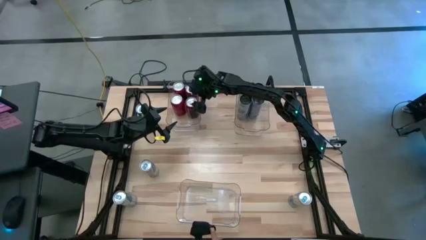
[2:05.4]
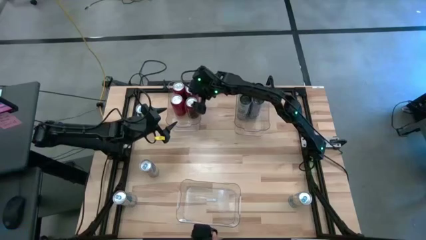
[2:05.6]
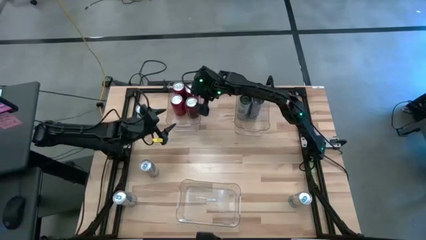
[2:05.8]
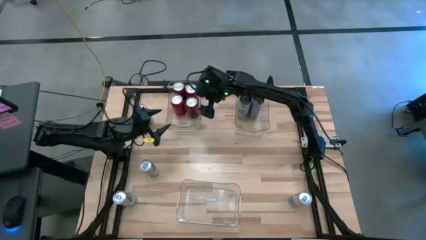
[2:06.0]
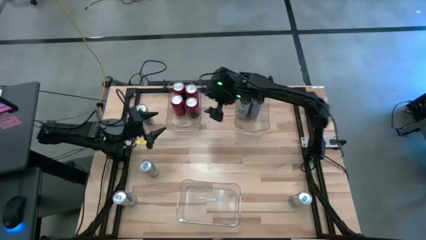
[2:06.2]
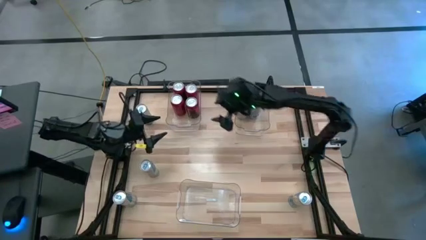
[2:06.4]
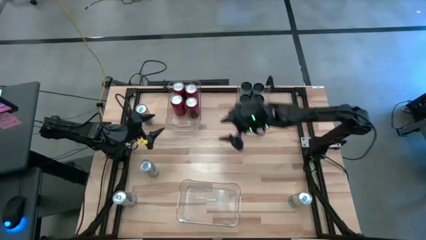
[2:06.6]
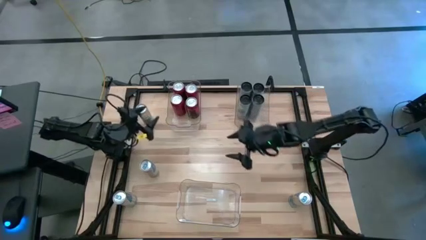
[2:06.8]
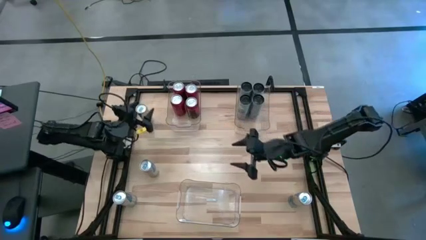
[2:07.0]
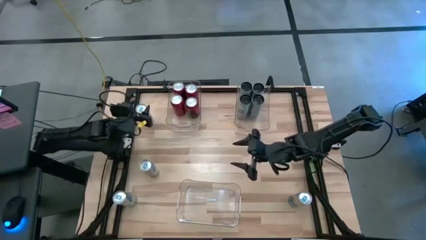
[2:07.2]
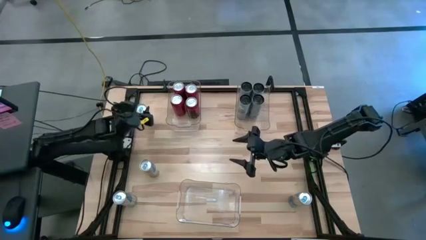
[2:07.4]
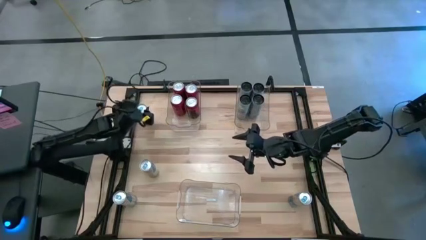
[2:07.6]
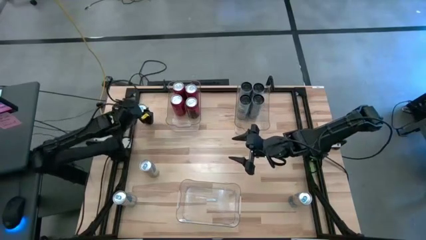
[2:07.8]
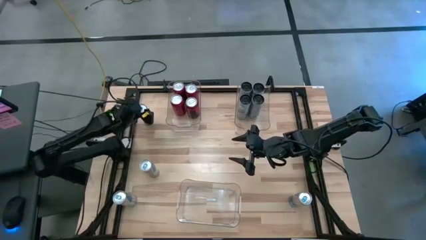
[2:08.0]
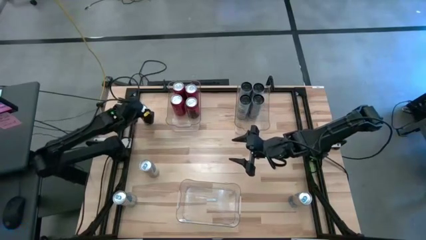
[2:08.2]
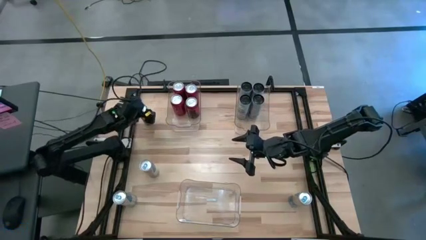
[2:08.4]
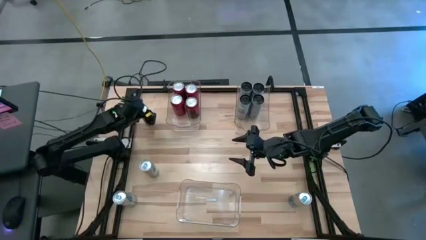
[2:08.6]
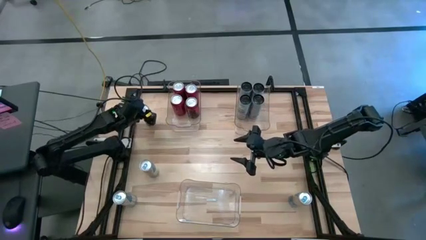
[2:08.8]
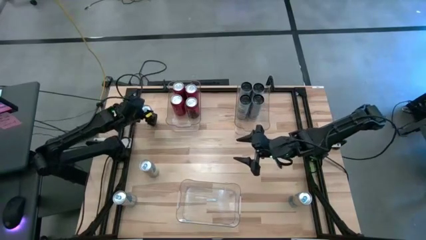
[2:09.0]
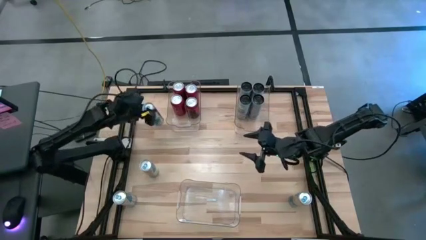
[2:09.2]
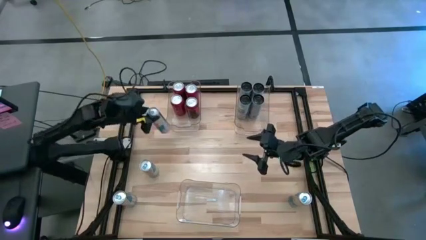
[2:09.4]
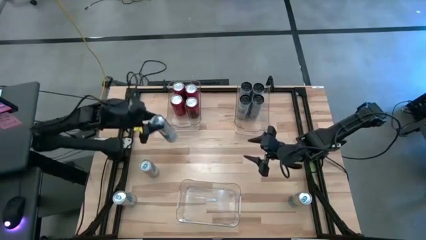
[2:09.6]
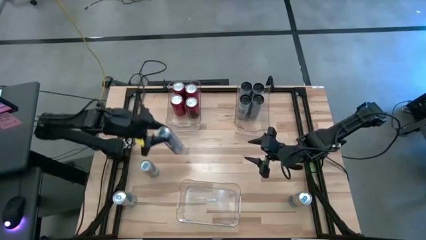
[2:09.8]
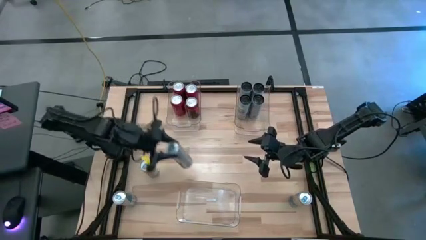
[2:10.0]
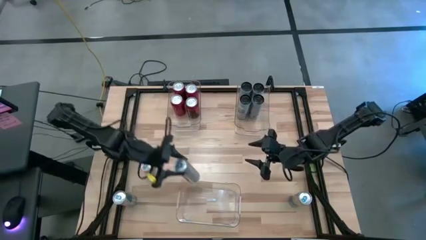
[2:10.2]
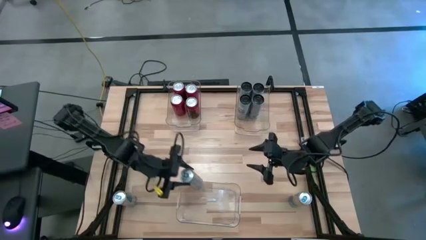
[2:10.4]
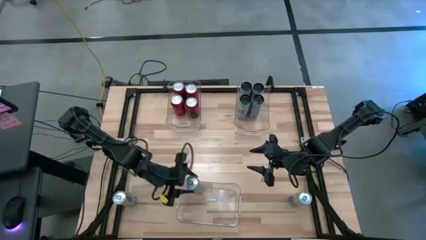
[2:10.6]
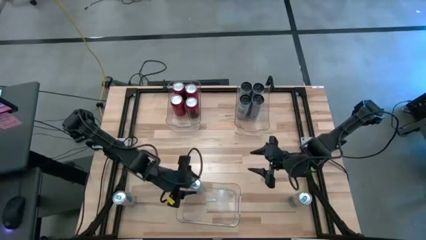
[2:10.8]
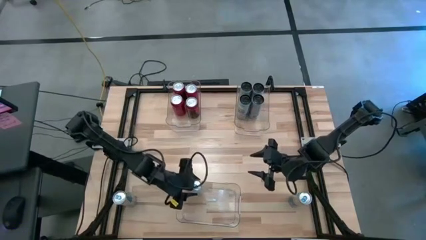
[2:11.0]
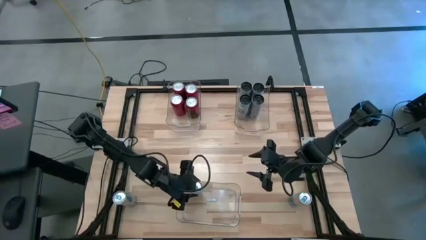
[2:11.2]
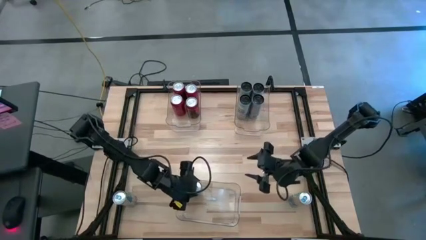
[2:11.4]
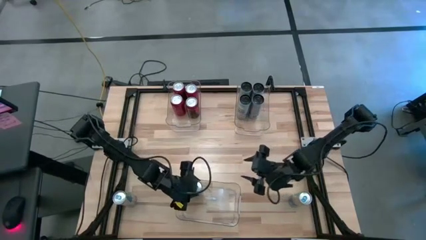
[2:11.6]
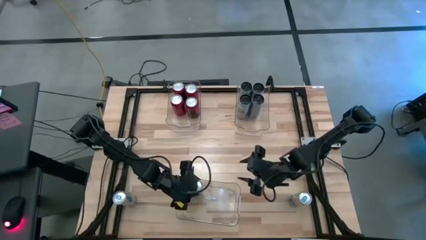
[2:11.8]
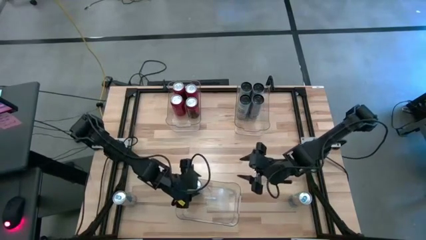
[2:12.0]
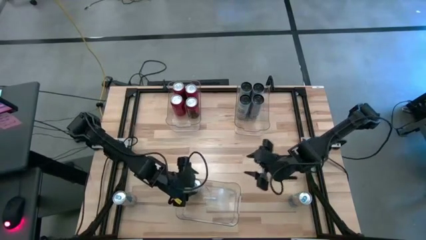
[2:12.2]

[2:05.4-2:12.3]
Task: Sort soda cans
Put the top left blue soda can into the bottom transparent bin

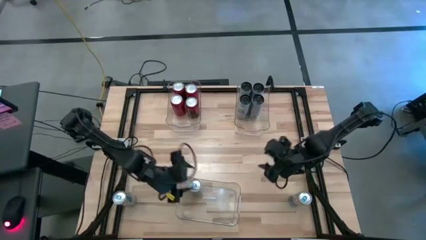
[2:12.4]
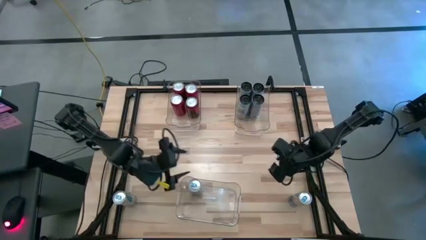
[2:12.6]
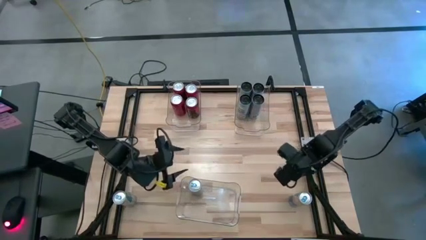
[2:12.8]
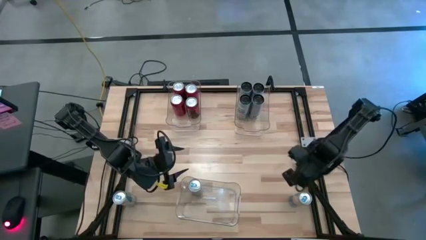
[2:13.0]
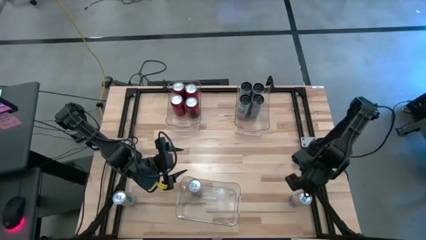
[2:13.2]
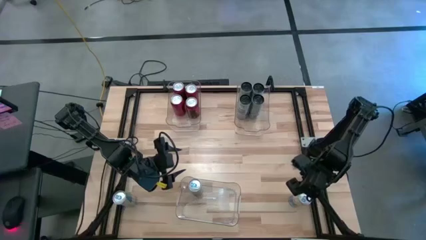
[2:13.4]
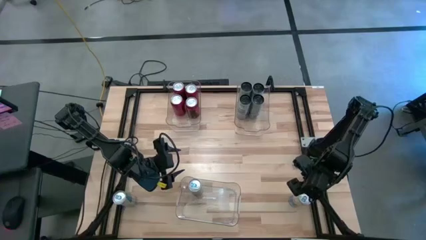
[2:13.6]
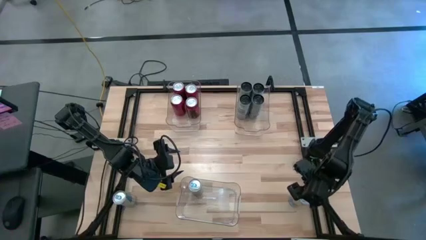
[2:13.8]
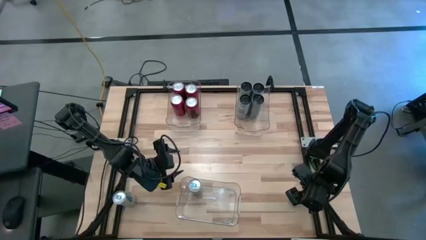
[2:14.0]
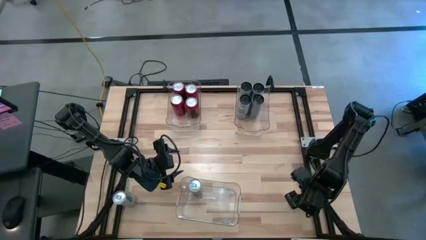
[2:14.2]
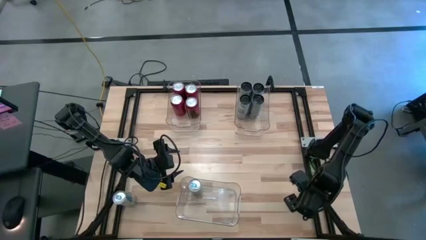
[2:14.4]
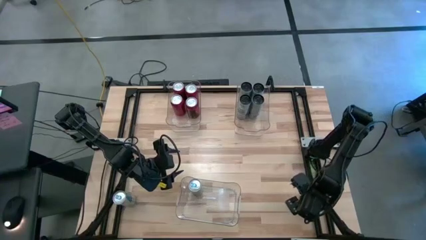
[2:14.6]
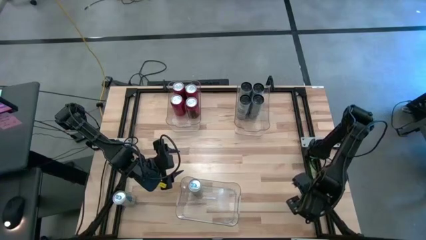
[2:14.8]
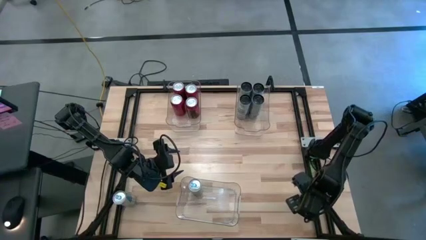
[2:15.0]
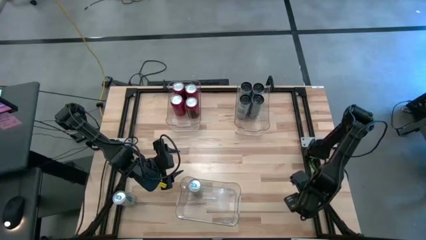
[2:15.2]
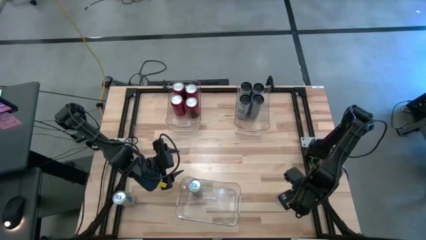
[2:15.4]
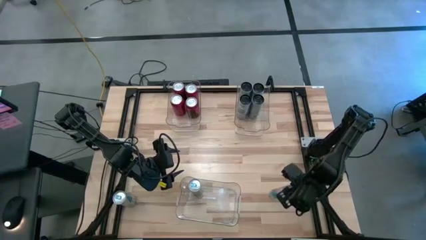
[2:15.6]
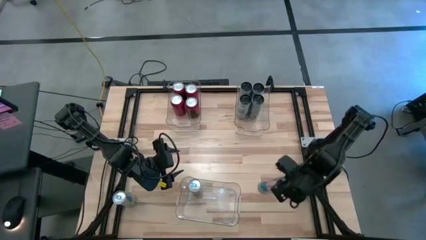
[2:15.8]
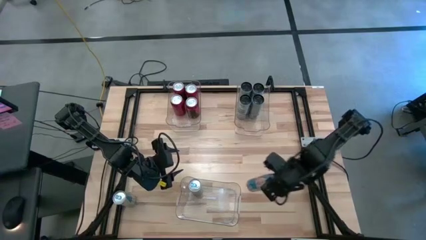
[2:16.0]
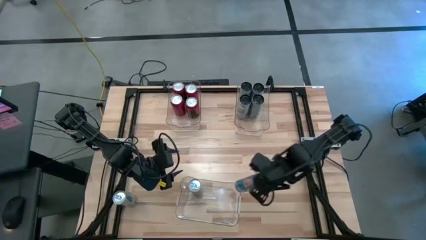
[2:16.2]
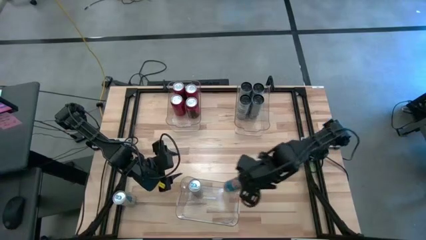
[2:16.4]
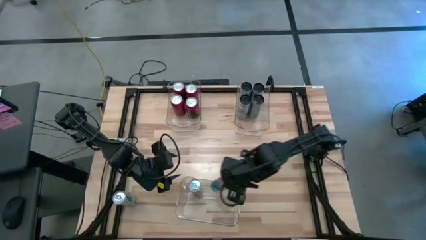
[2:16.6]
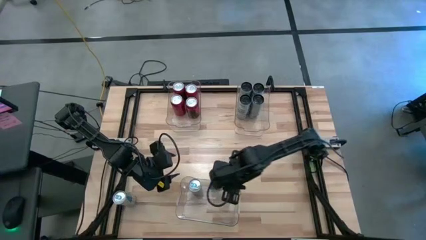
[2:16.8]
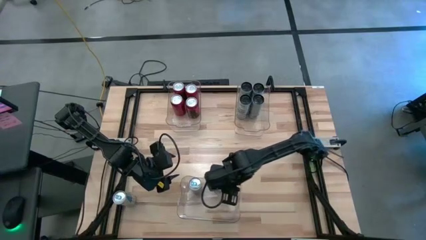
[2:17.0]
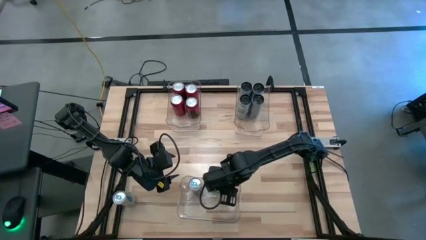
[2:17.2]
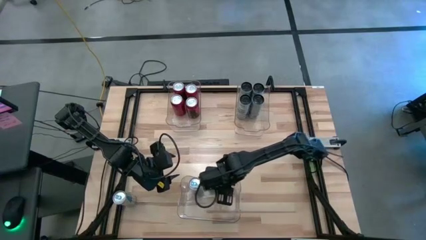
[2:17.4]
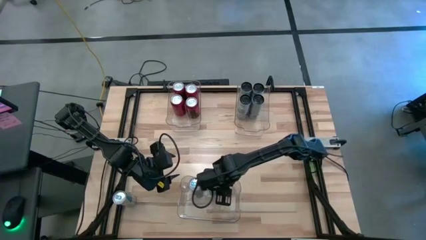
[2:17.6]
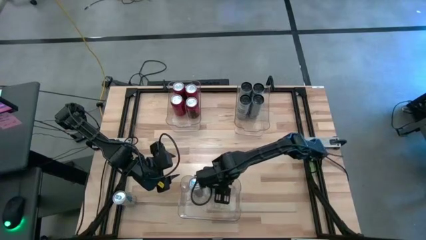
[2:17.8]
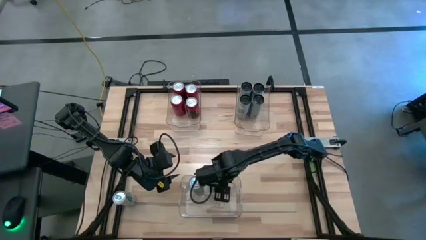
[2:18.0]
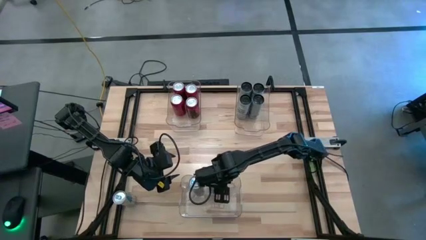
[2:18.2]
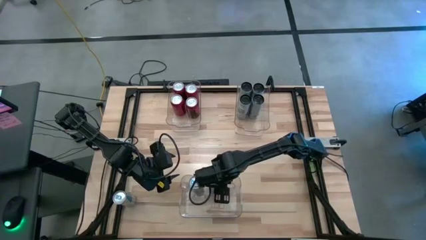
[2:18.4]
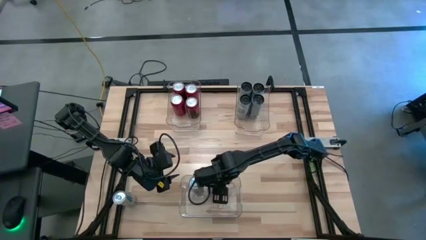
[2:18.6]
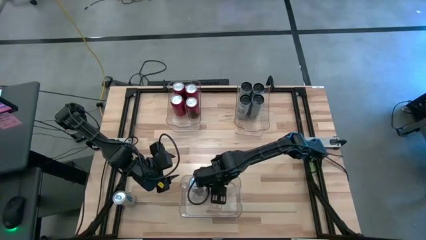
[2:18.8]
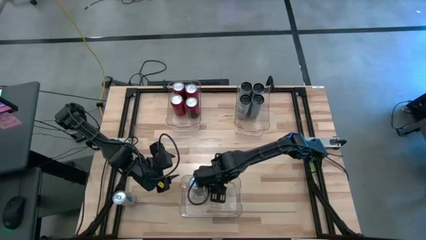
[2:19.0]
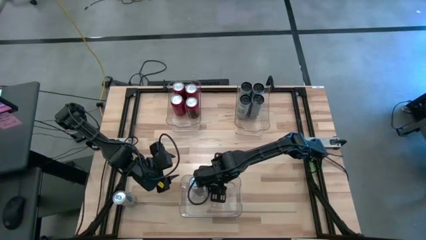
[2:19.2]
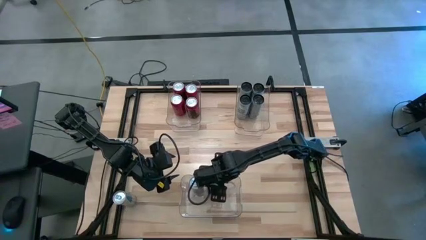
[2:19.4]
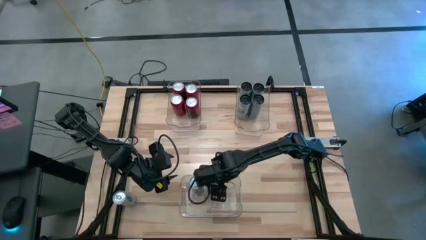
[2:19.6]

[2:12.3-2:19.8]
Put the bottom right blue soda can into the bottom transparent bin
